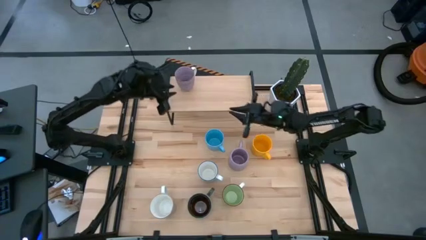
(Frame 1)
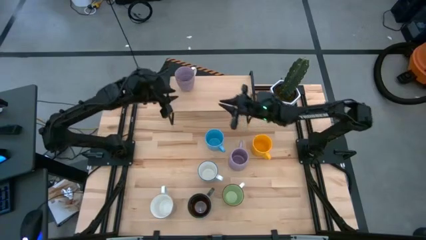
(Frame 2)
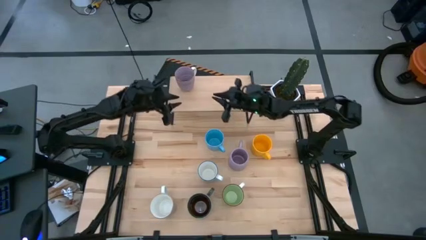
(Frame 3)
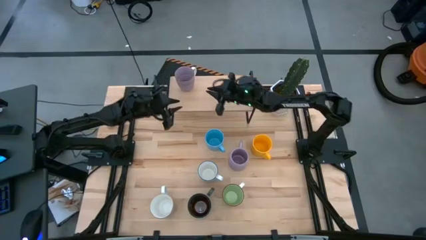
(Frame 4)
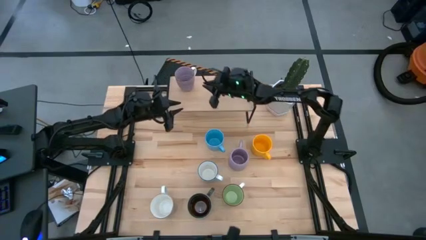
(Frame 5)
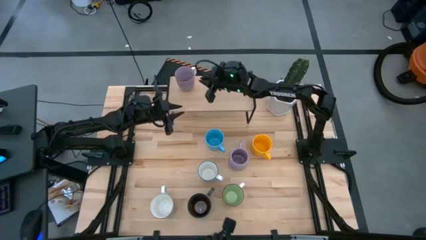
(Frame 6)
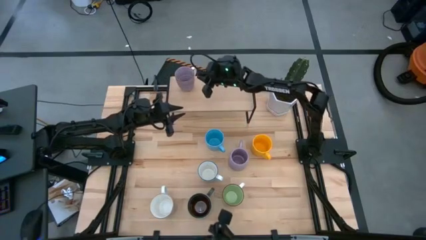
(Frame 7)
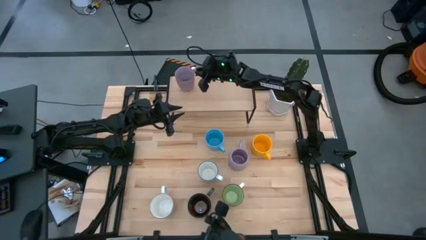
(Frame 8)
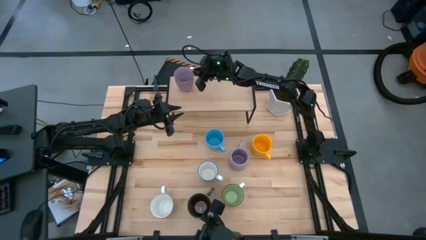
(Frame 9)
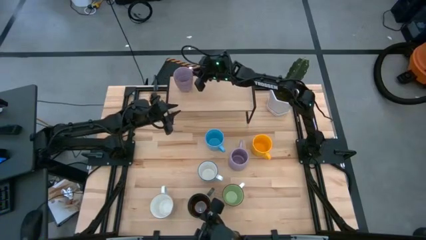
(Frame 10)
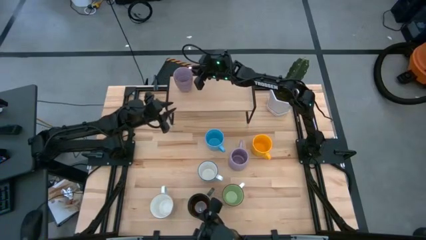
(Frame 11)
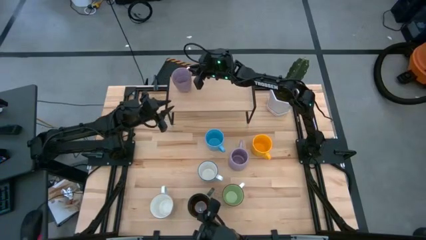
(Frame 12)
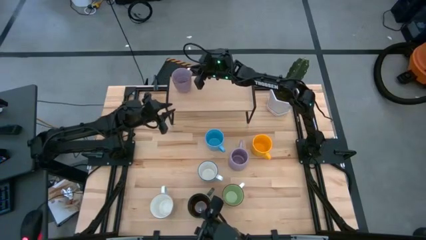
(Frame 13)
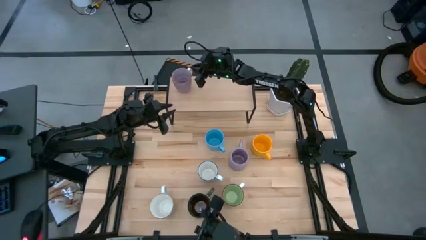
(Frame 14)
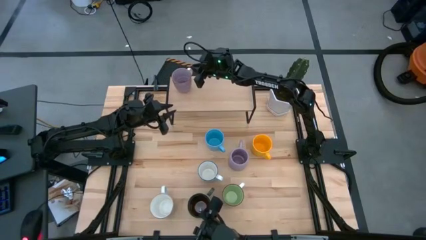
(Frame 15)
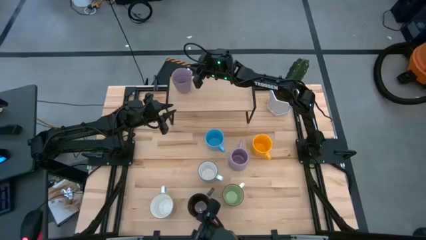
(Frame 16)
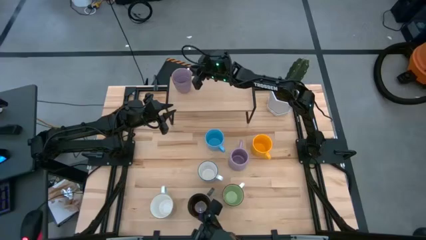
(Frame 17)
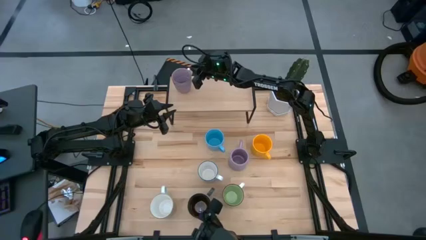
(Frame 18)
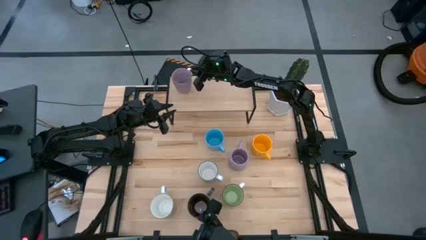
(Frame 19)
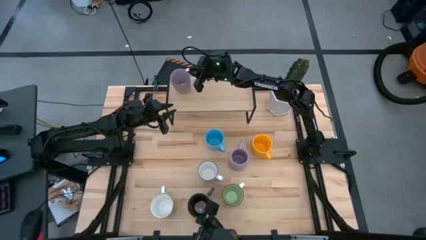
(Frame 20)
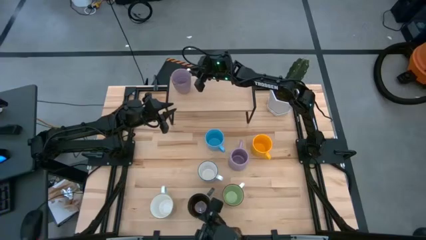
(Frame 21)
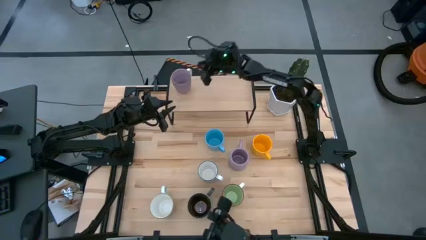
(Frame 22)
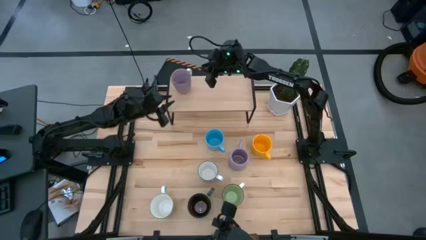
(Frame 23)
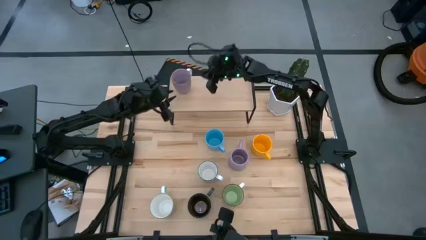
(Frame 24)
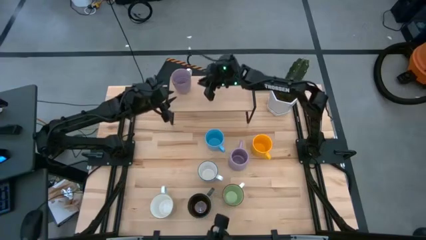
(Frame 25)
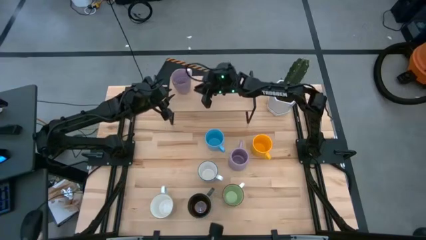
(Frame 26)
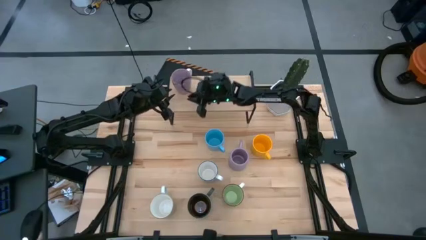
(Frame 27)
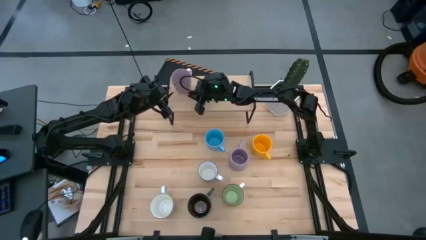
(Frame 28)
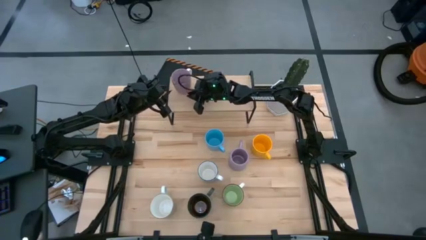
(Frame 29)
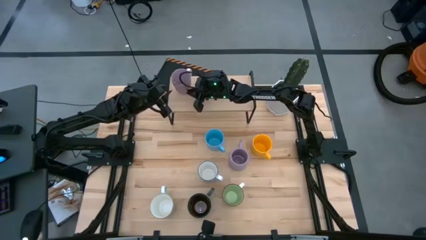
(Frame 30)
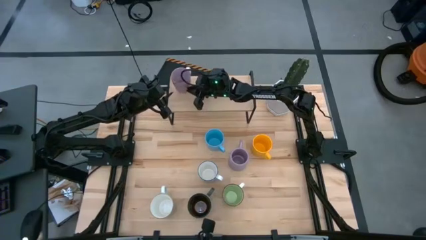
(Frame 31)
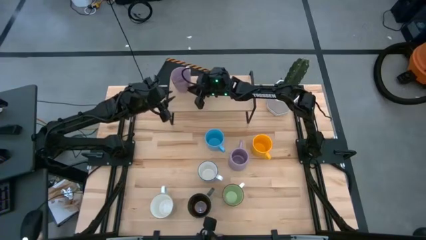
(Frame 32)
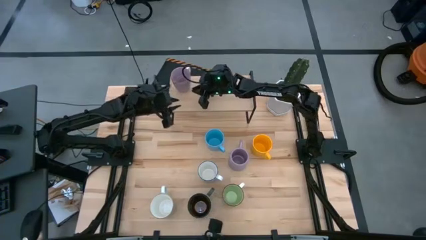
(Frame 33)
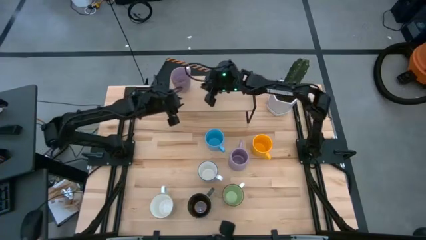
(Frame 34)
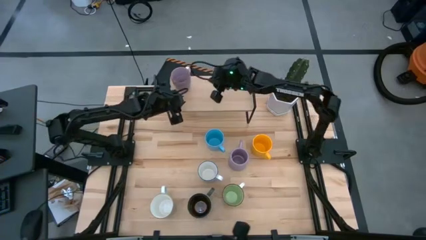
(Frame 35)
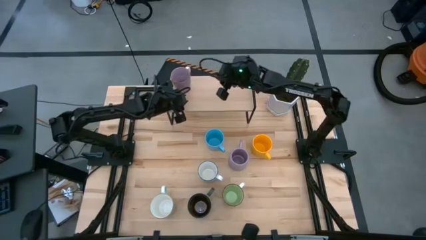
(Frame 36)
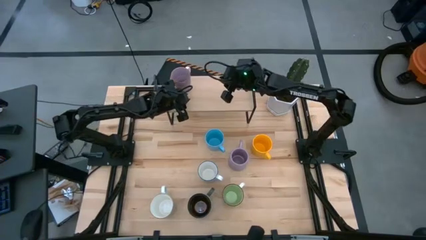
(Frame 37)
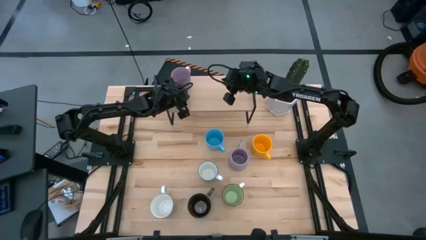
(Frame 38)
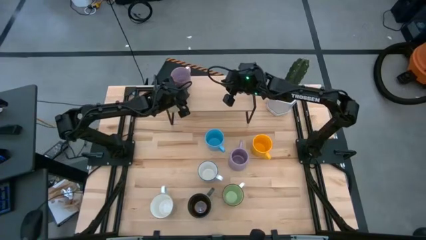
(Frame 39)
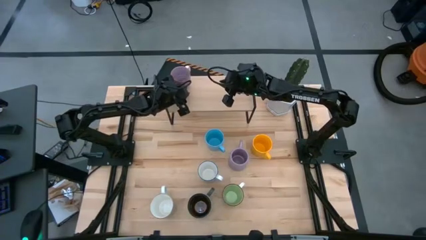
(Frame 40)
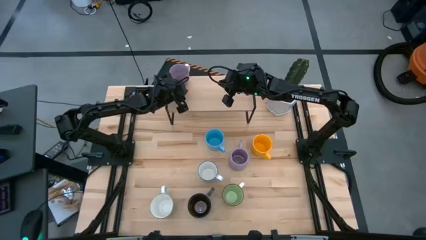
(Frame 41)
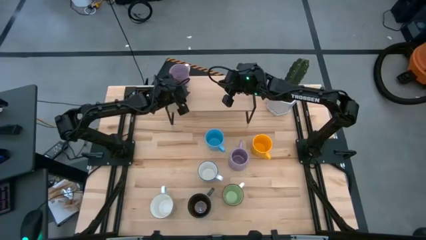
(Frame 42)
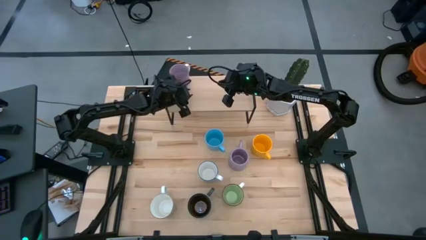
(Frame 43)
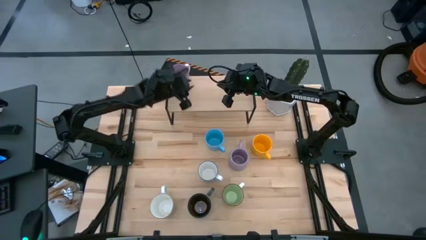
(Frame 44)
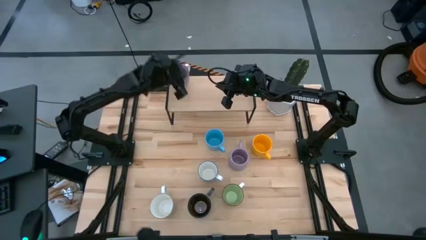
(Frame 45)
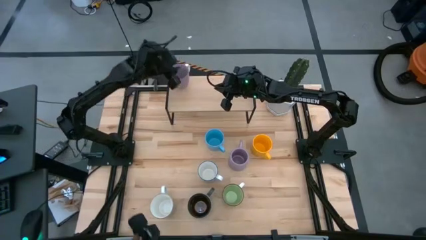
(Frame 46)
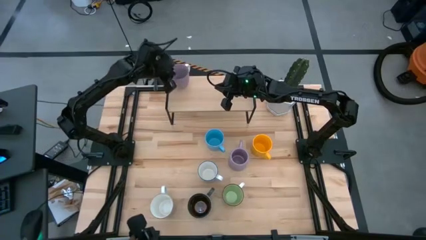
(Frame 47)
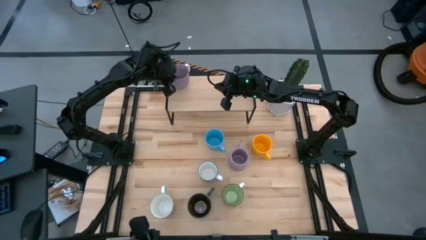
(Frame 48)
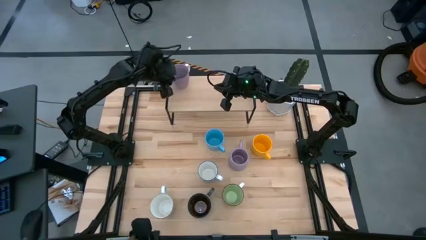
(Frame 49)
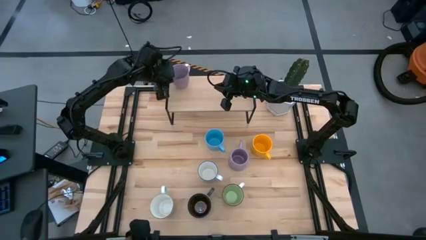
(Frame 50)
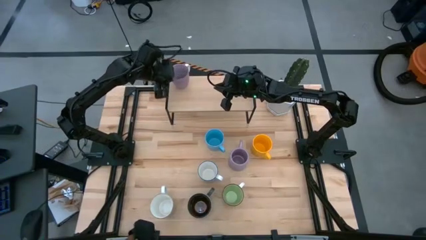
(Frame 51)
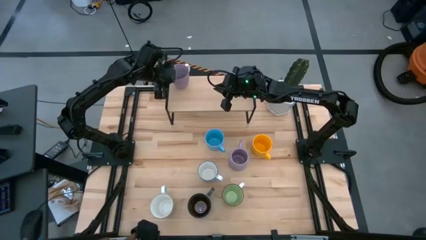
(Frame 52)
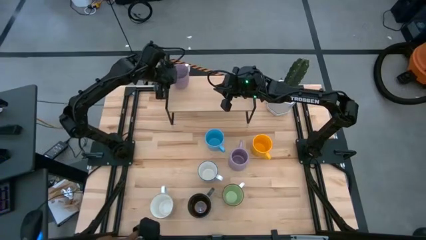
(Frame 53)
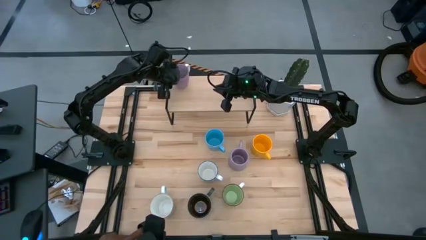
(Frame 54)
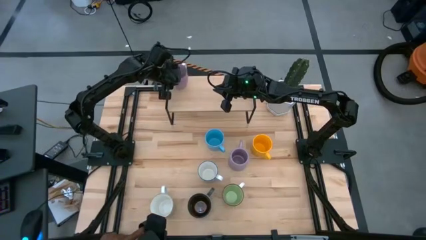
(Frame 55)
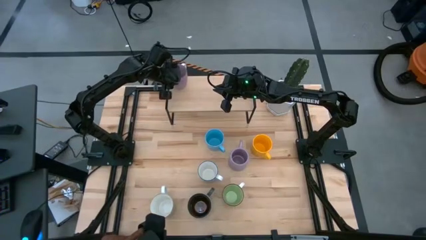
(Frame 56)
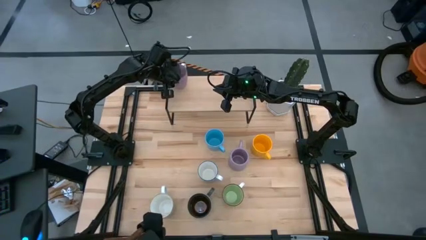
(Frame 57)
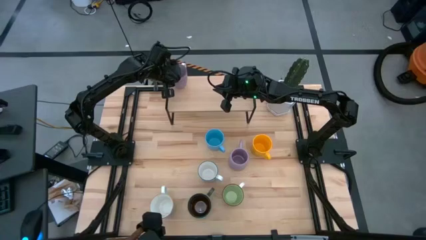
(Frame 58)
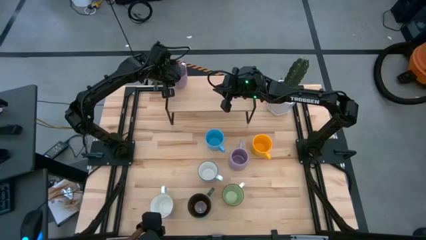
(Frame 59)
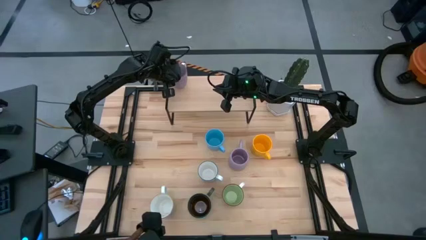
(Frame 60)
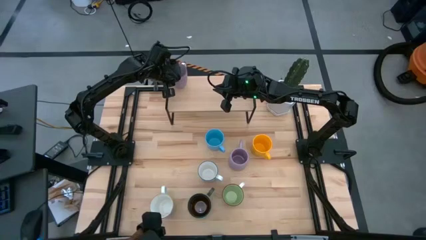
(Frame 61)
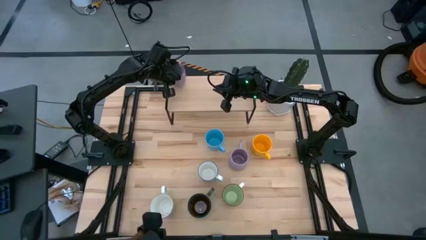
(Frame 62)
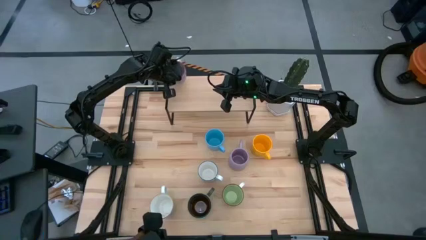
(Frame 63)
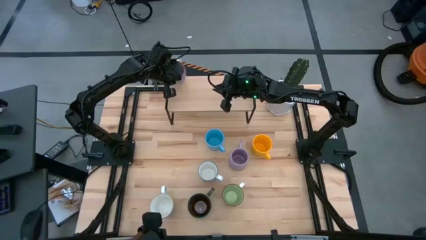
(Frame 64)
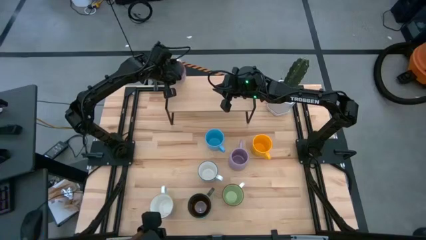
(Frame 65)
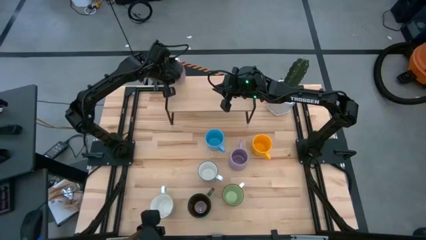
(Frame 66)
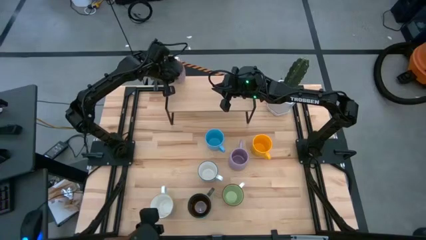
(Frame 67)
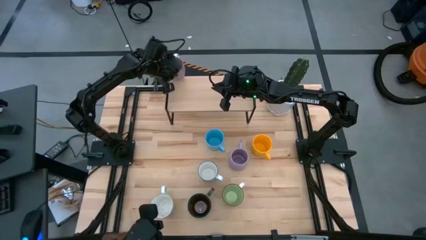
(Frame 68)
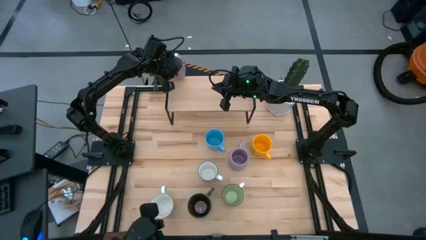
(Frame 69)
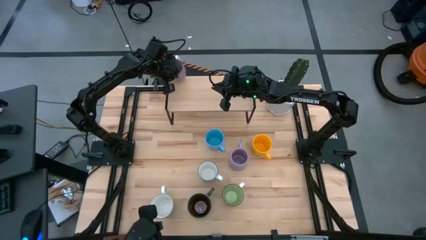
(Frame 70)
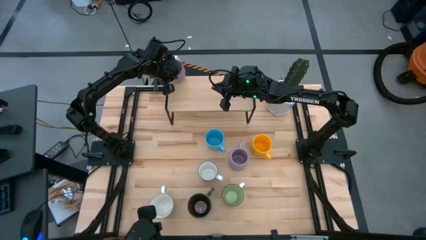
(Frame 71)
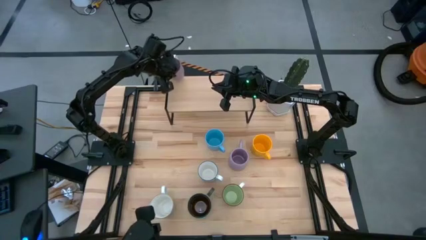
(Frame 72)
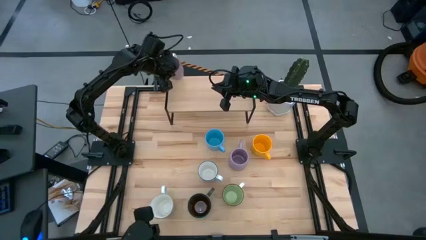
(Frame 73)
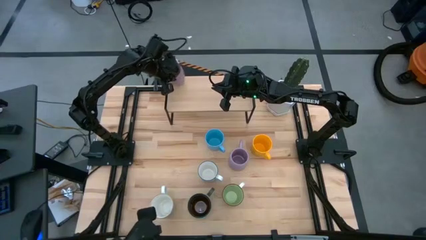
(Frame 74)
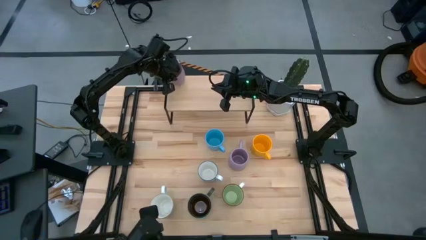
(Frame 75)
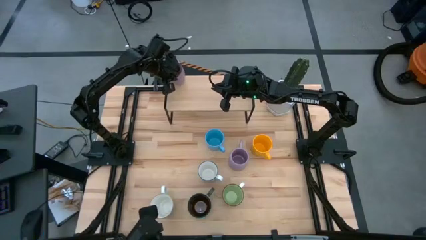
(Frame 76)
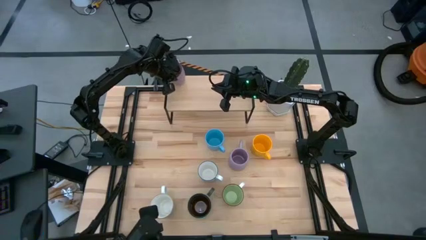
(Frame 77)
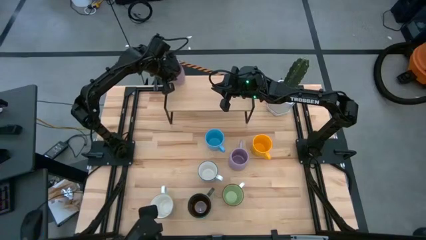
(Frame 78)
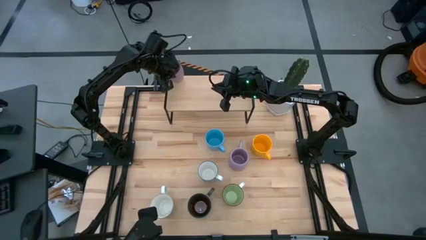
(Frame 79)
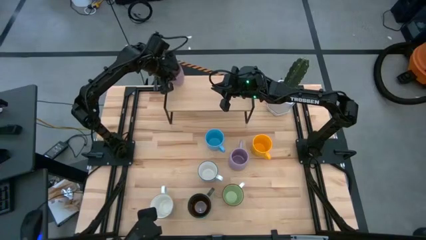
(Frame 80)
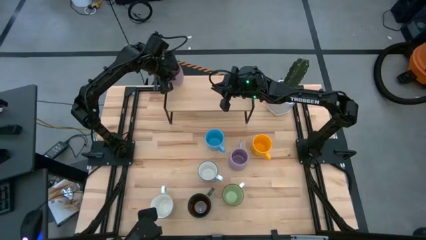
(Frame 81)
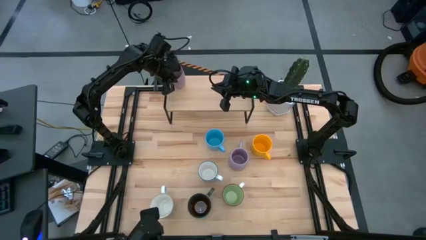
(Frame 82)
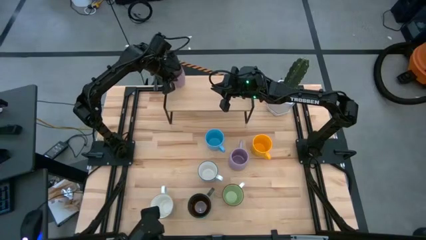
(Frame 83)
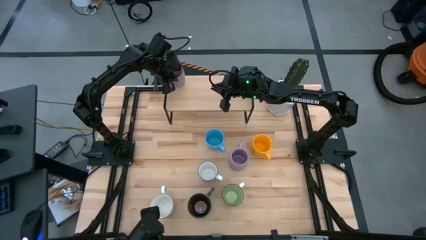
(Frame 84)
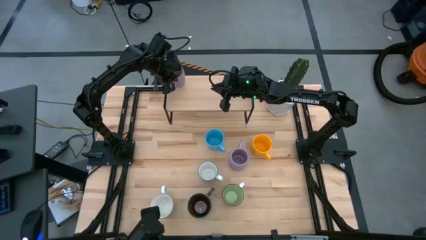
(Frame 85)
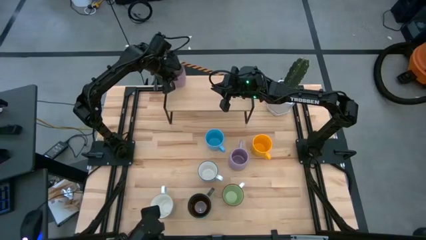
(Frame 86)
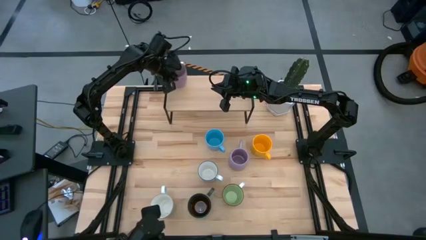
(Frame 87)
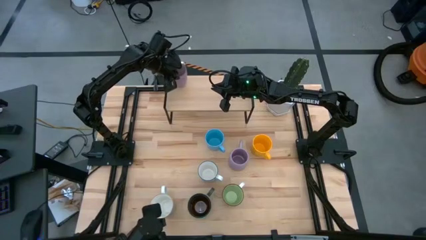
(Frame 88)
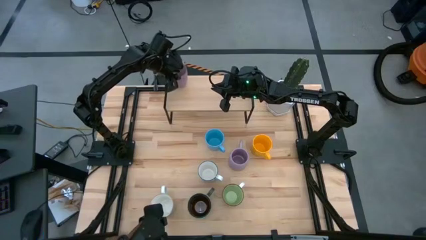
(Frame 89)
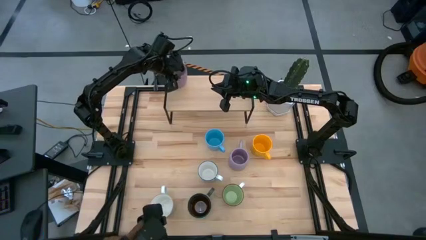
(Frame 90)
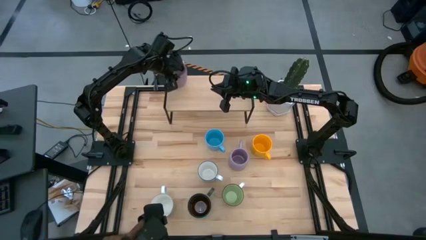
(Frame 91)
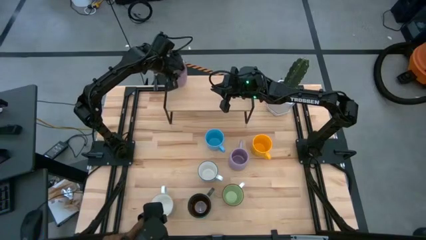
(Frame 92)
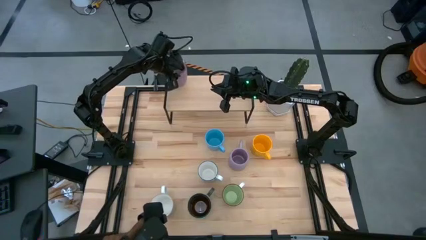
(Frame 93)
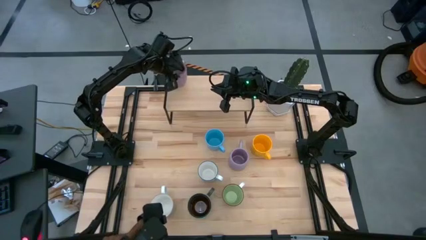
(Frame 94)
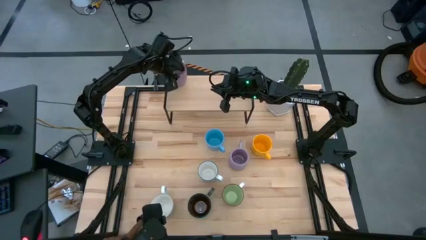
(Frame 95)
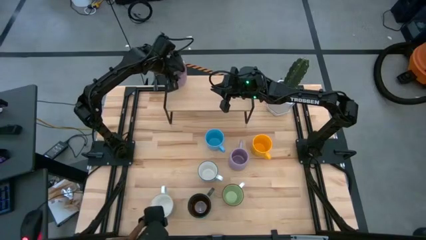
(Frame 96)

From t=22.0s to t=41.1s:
Task: Place coffee mugs
Put the left purple mug on the shelf
